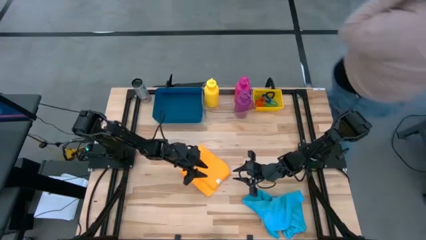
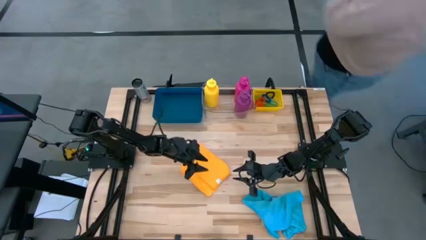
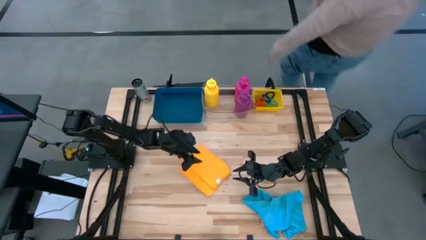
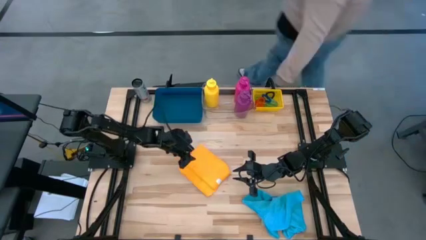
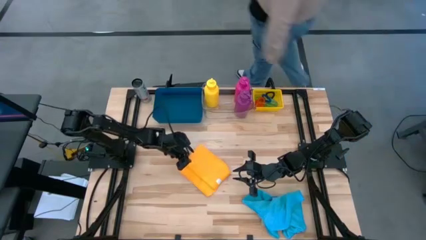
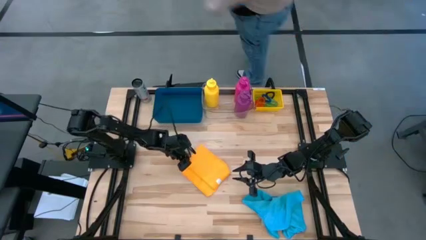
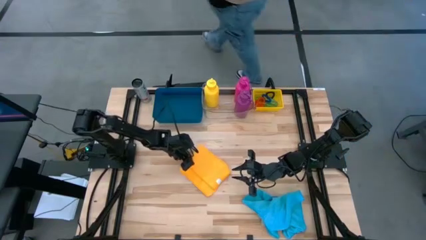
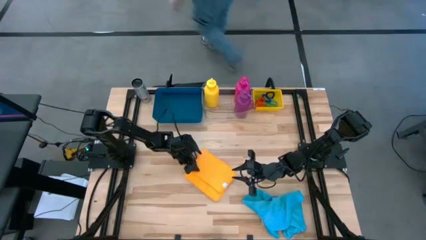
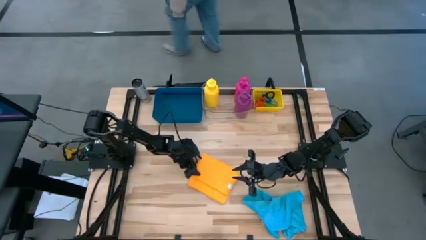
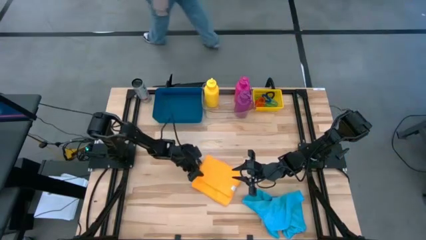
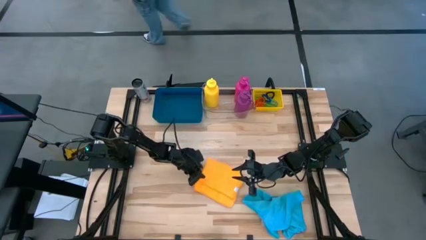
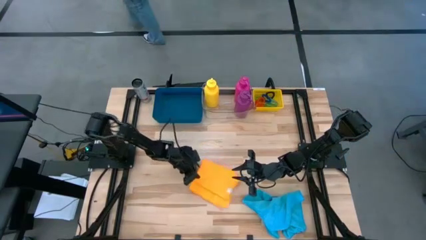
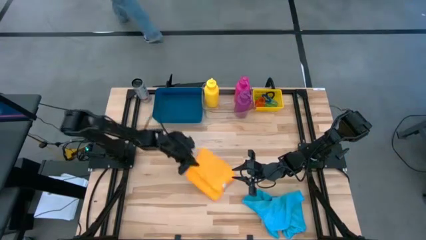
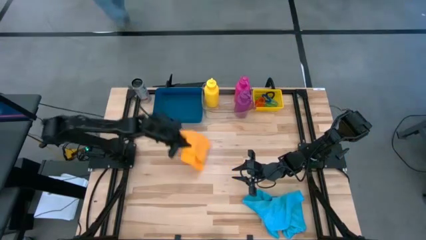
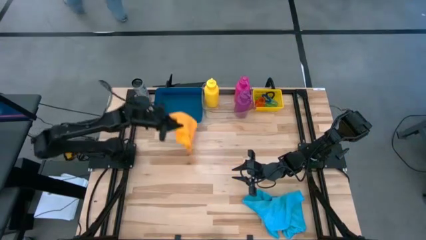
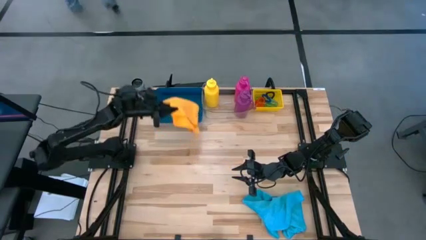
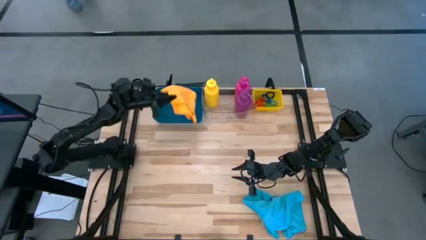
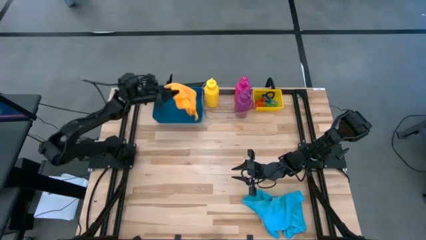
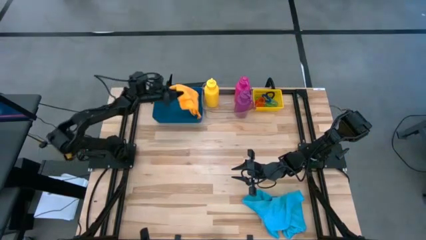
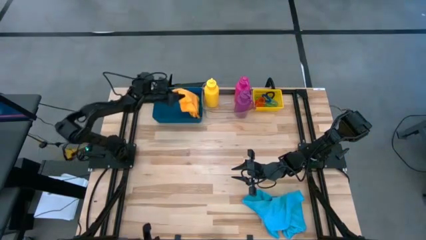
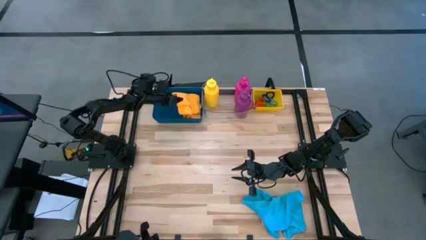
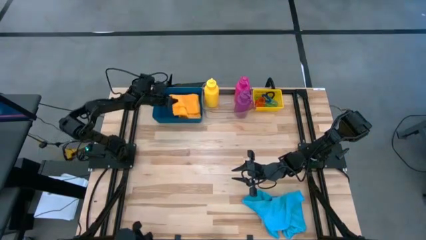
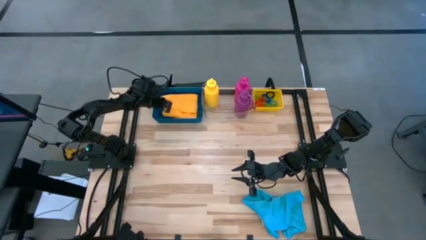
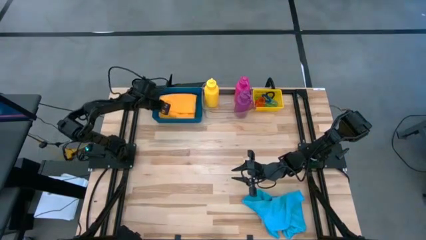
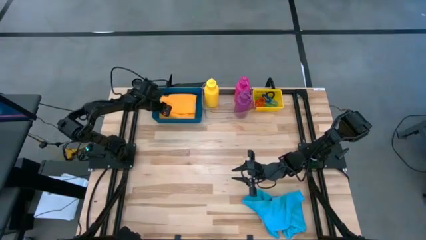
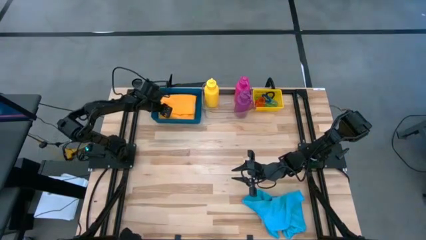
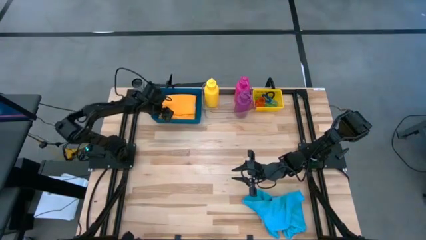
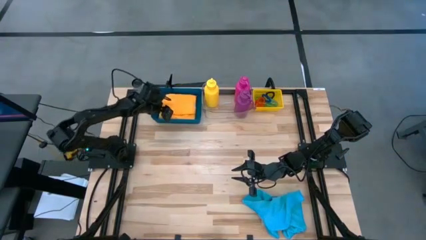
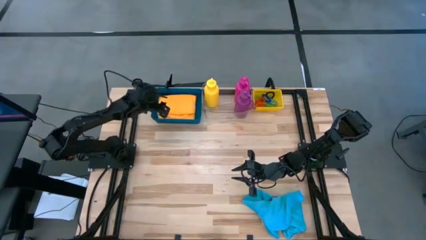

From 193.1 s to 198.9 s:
Task: Pick & Place Sports Items
Put the orange towel into the blue bin

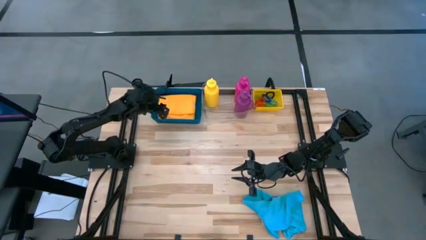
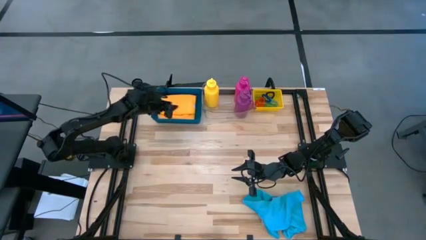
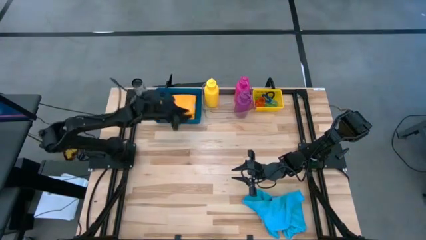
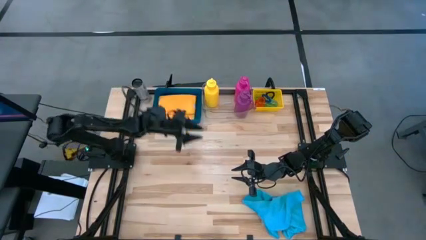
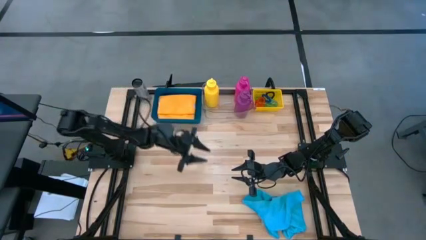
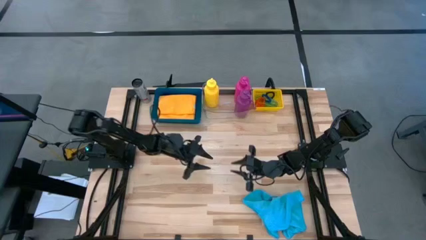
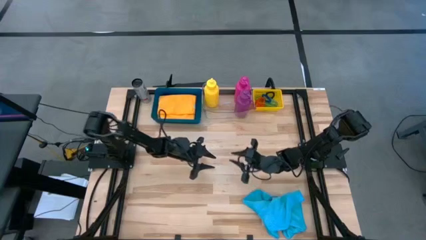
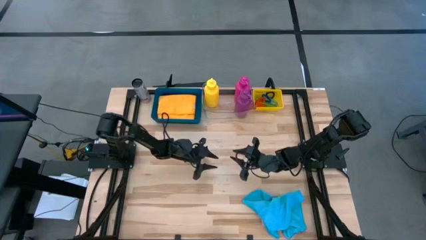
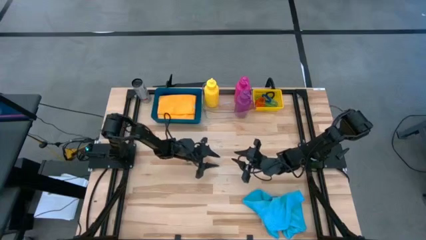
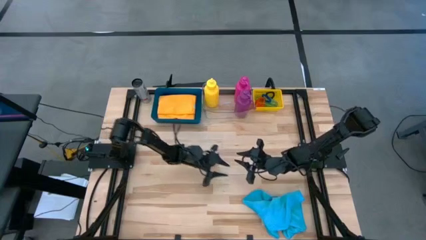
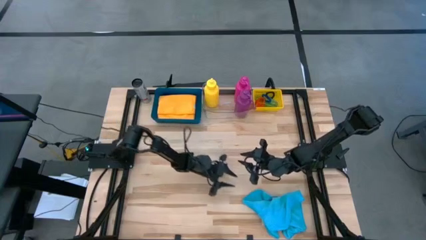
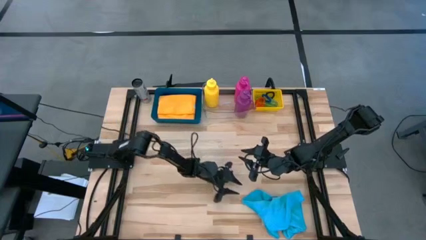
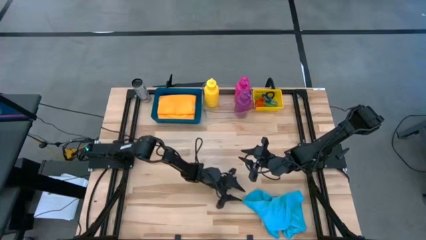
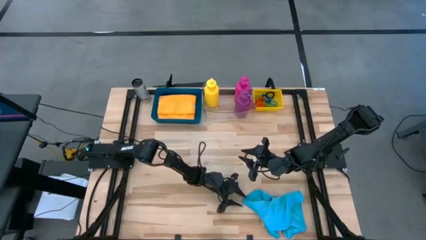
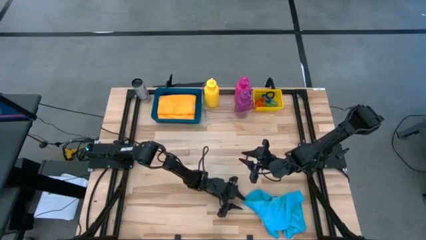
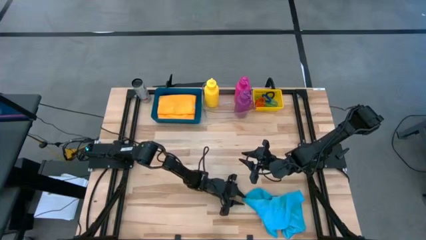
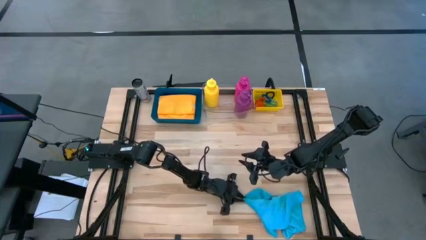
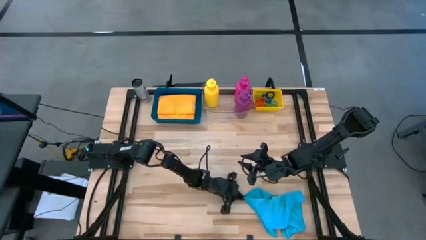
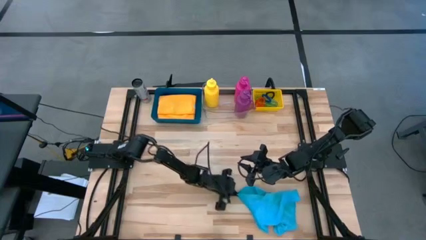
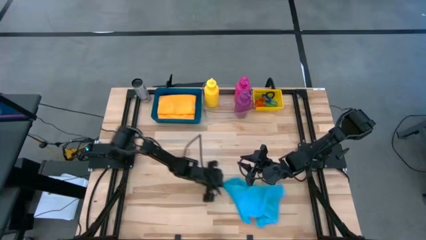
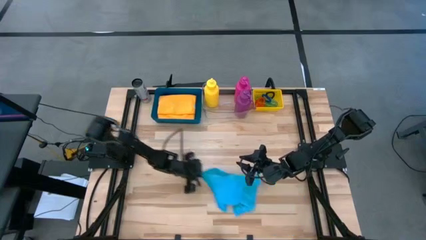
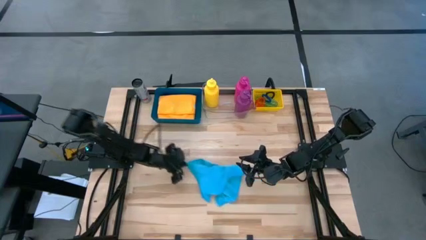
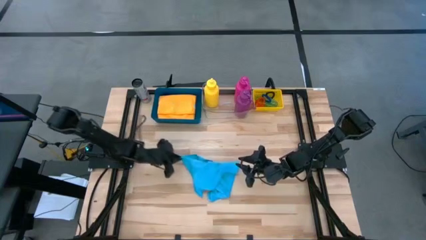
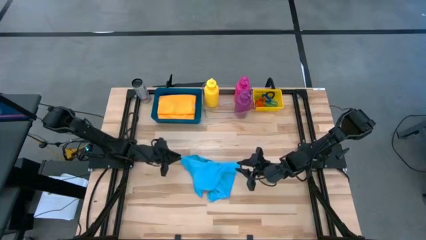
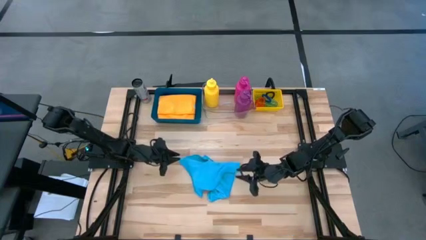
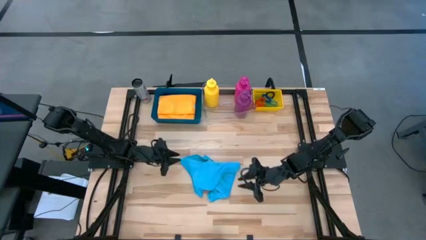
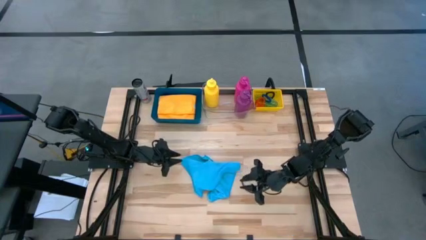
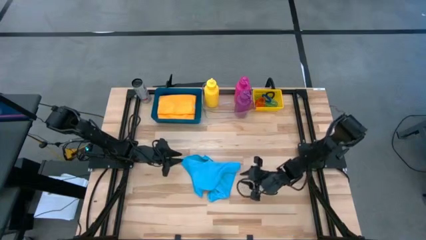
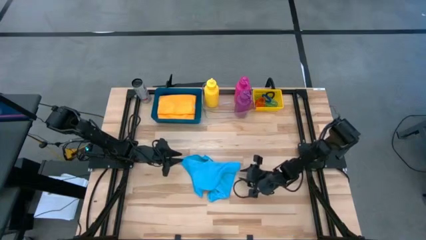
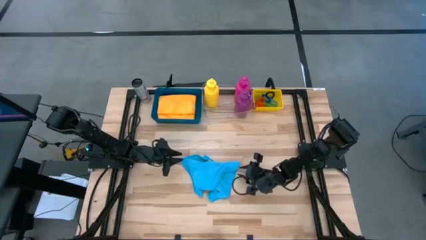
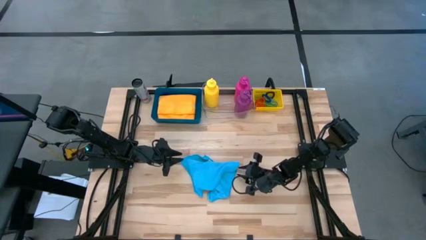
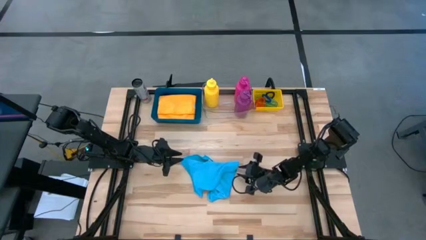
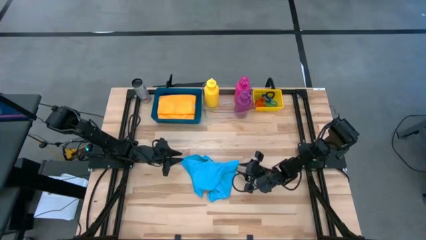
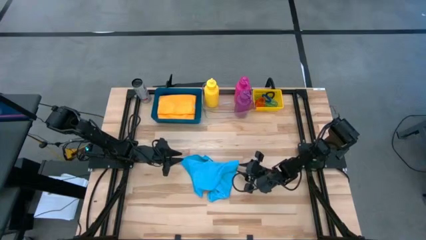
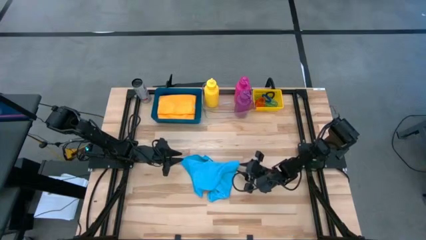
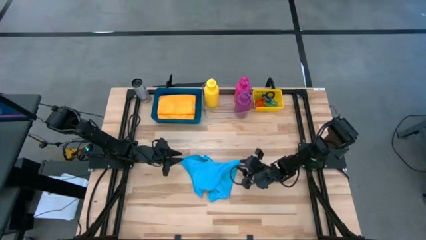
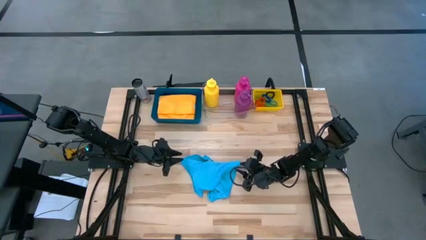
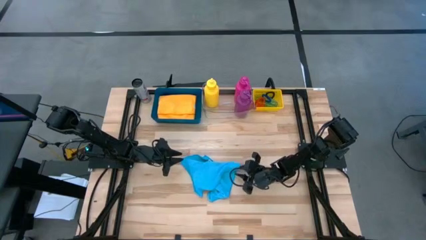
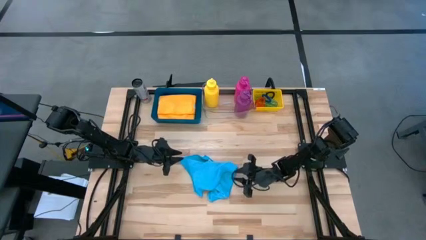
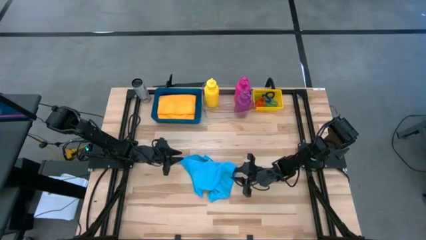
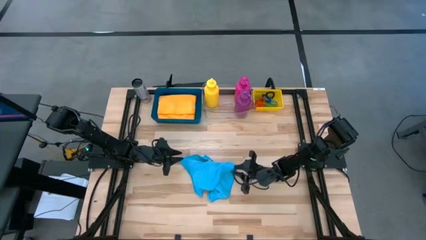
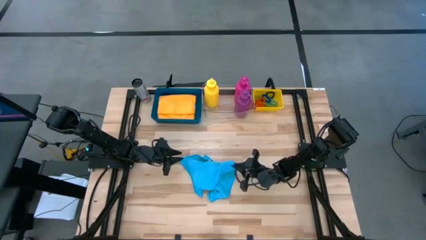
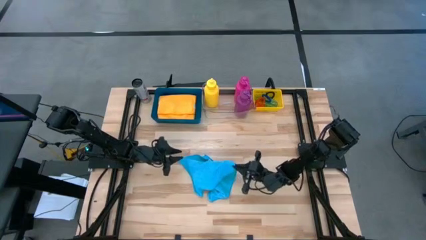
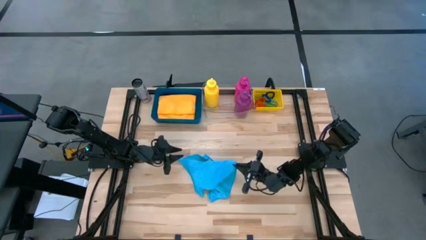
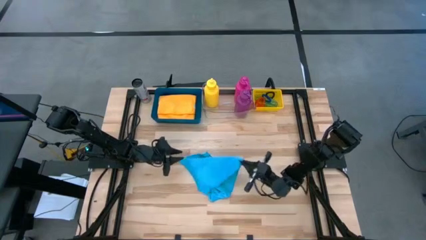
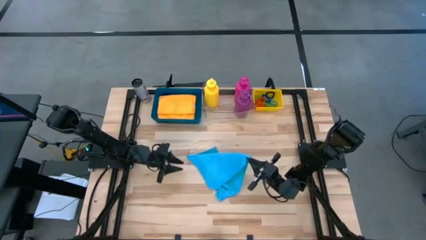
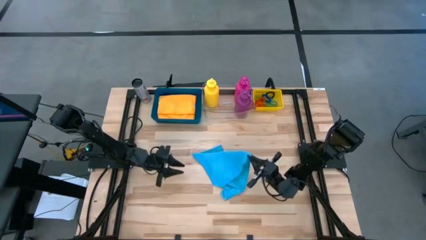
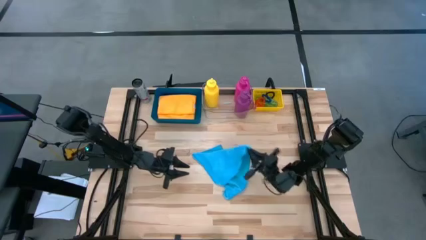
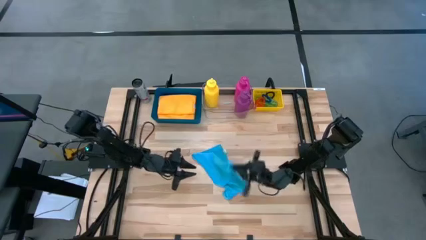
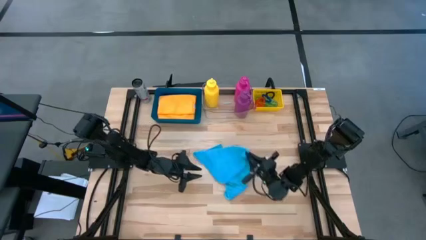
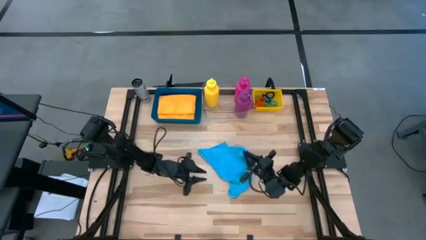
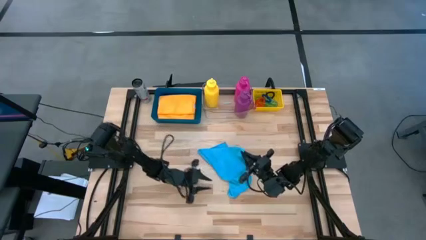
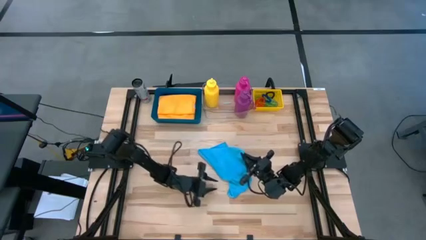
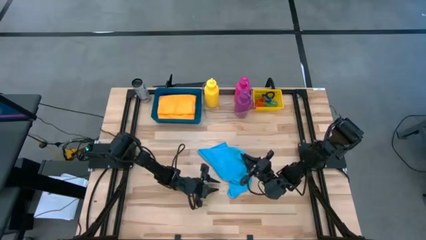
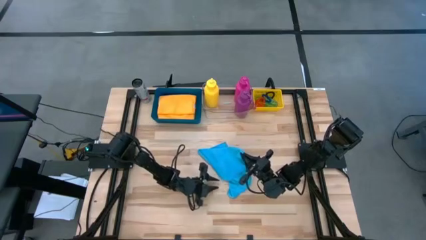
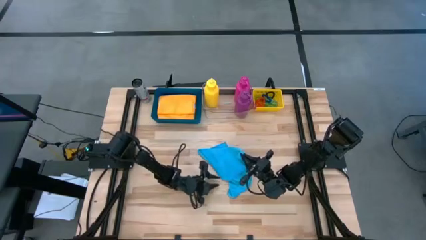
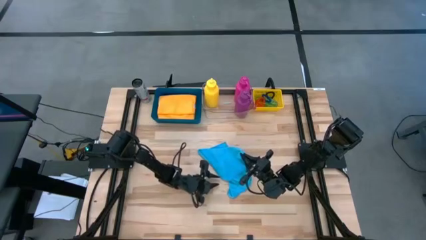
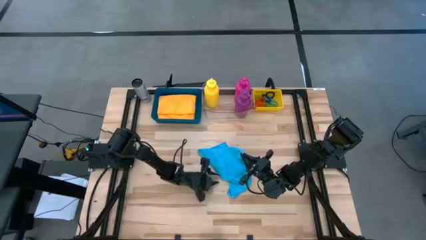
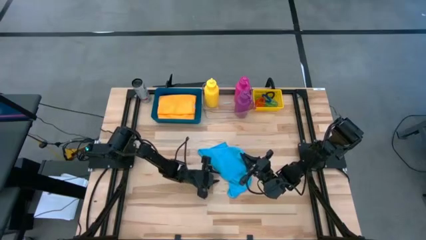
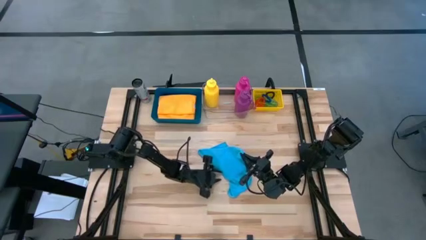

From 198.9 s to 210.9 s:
Fold the blue towel
